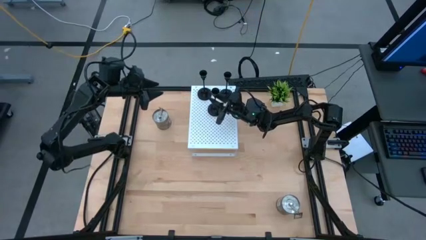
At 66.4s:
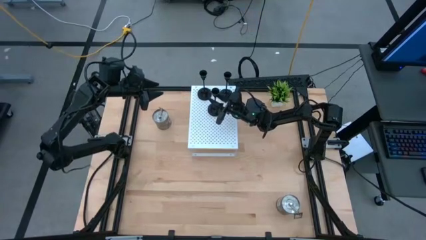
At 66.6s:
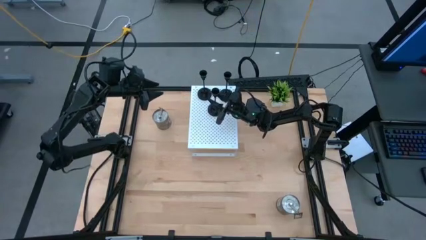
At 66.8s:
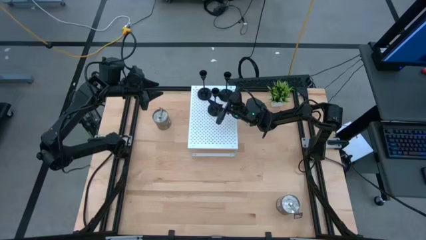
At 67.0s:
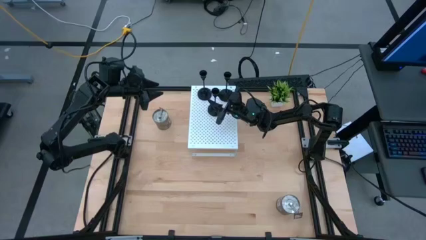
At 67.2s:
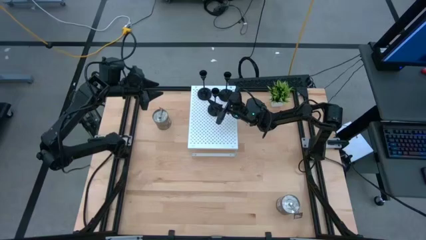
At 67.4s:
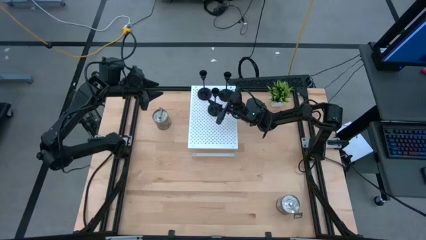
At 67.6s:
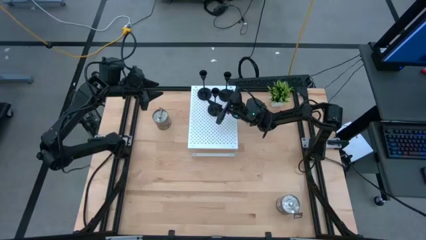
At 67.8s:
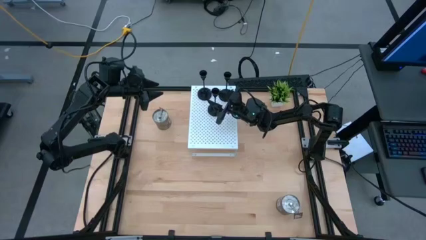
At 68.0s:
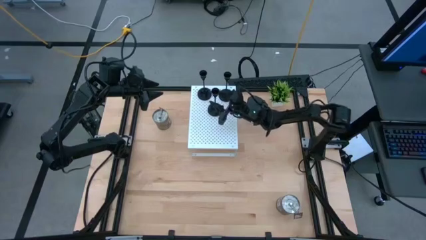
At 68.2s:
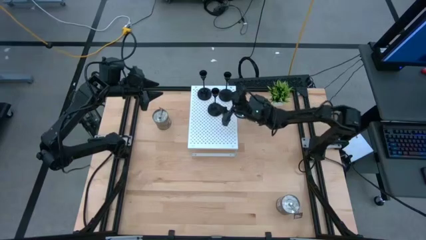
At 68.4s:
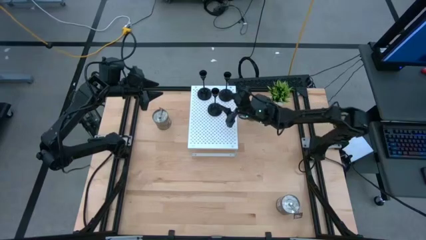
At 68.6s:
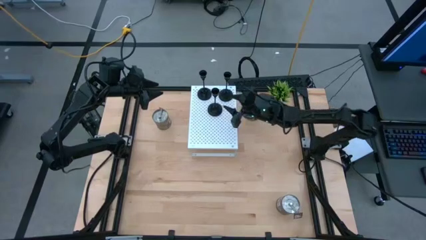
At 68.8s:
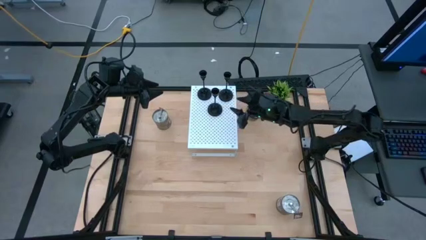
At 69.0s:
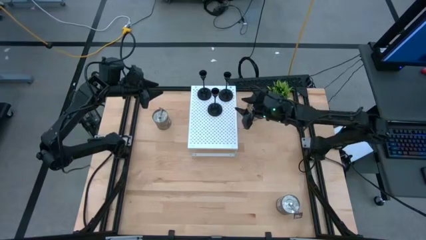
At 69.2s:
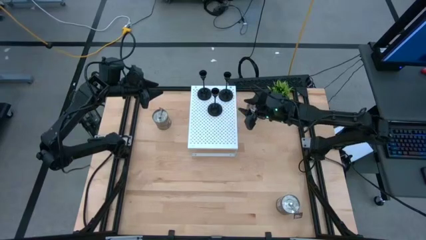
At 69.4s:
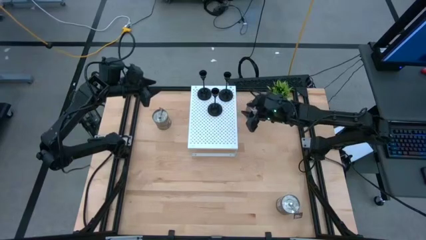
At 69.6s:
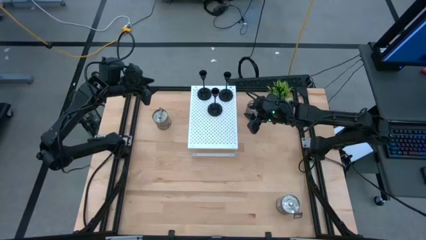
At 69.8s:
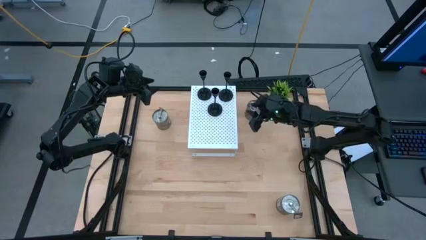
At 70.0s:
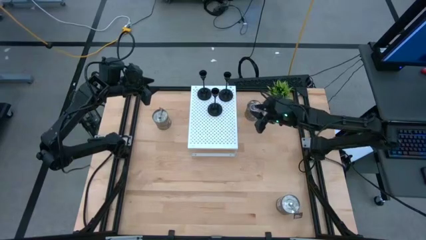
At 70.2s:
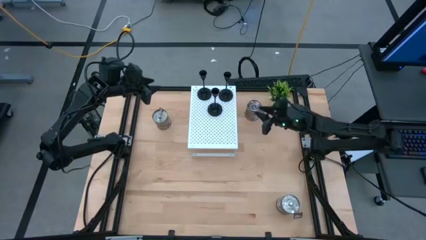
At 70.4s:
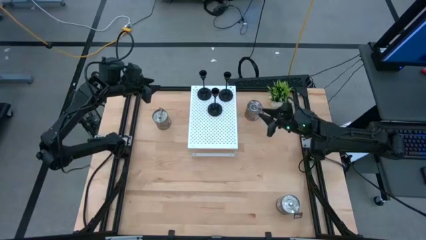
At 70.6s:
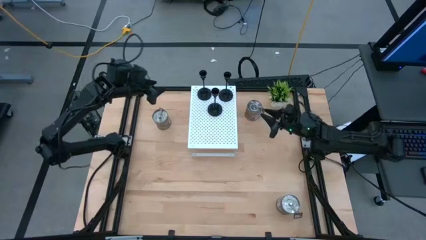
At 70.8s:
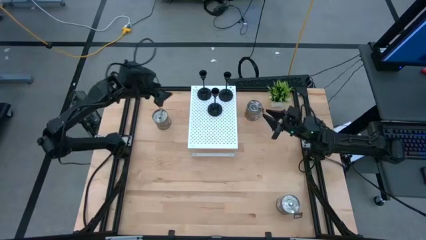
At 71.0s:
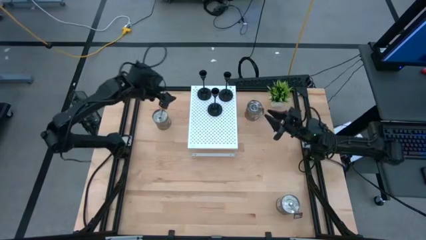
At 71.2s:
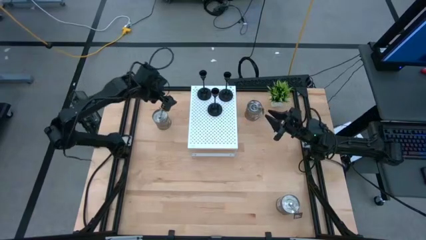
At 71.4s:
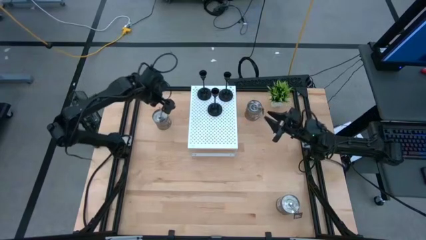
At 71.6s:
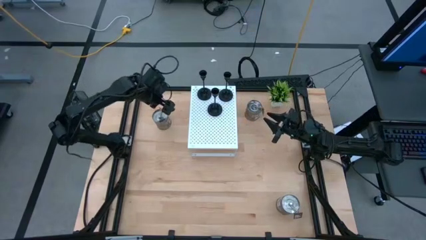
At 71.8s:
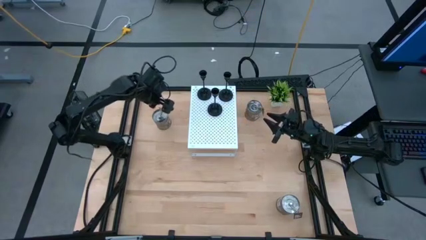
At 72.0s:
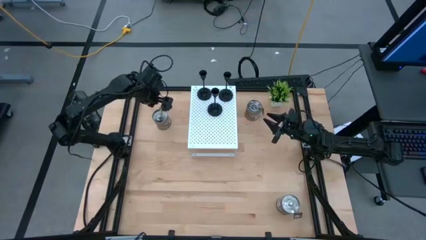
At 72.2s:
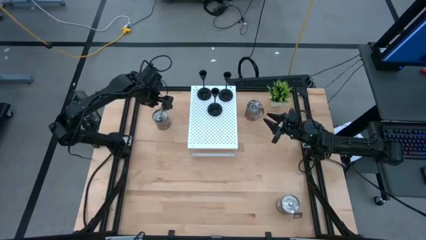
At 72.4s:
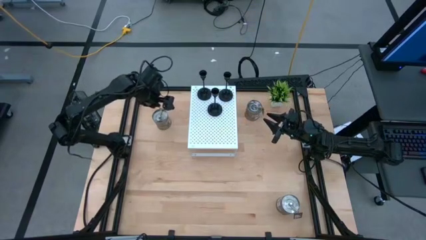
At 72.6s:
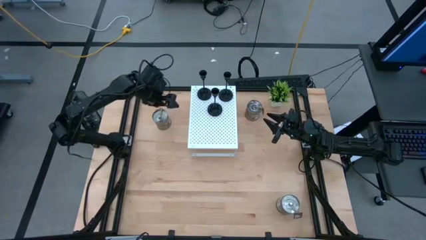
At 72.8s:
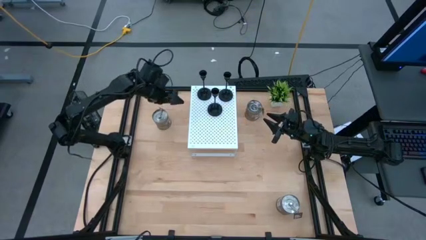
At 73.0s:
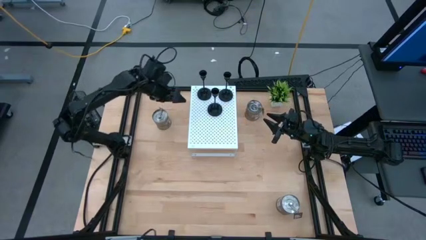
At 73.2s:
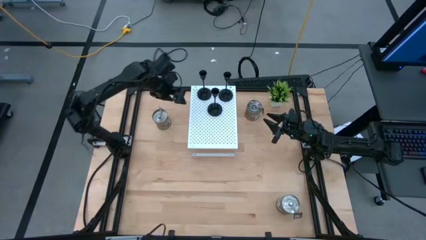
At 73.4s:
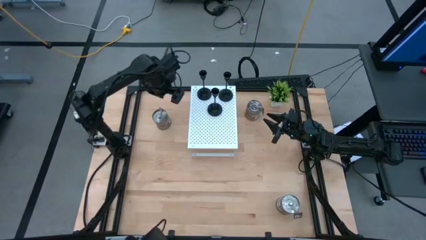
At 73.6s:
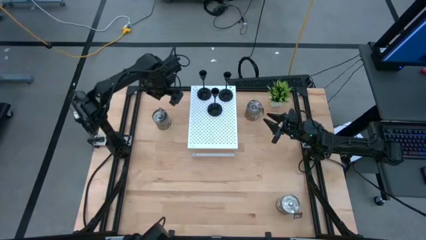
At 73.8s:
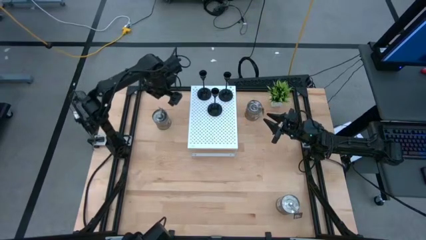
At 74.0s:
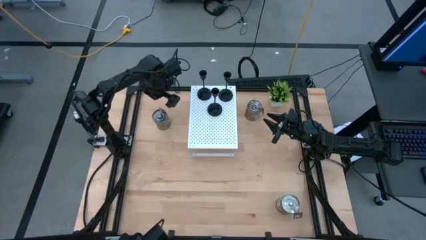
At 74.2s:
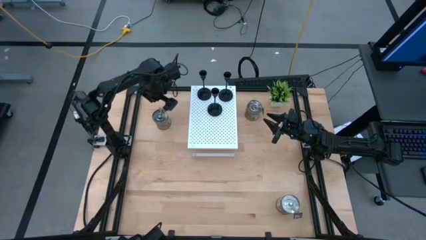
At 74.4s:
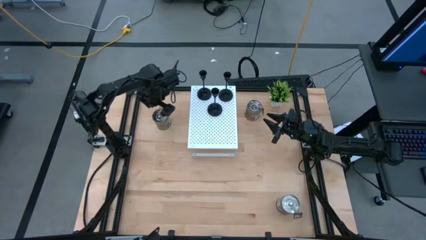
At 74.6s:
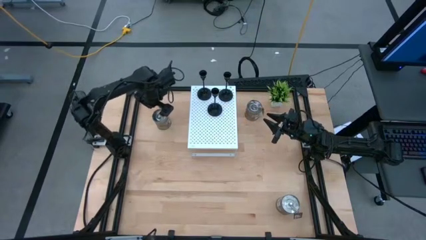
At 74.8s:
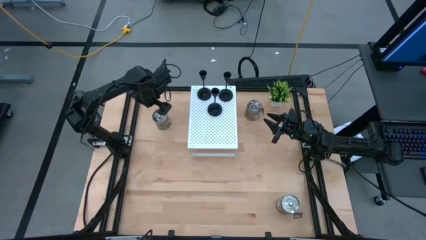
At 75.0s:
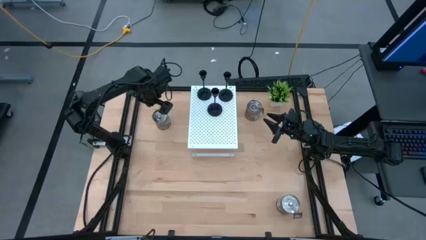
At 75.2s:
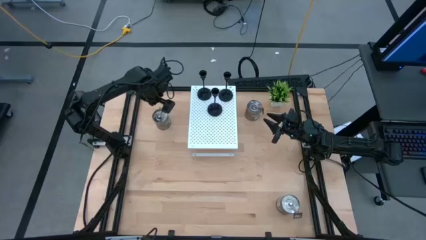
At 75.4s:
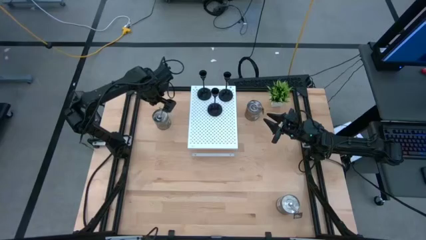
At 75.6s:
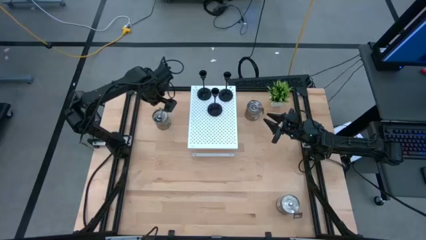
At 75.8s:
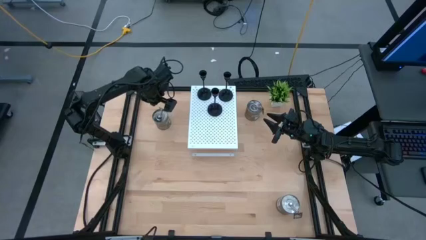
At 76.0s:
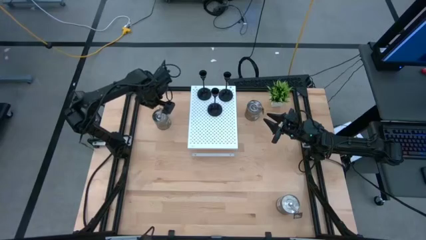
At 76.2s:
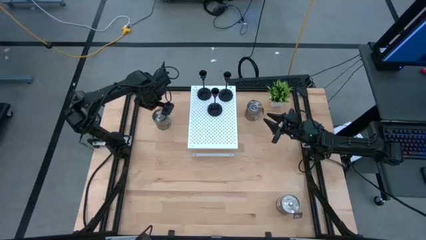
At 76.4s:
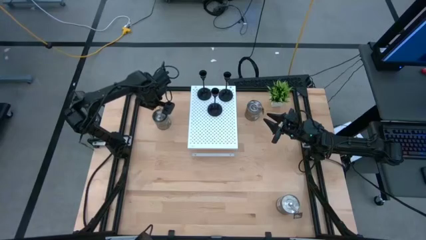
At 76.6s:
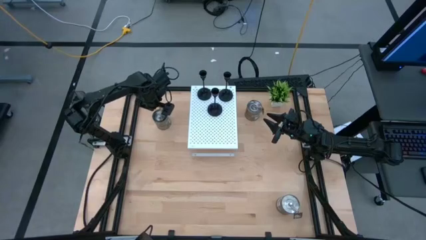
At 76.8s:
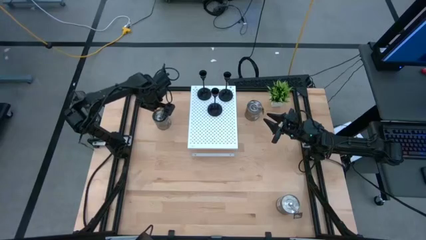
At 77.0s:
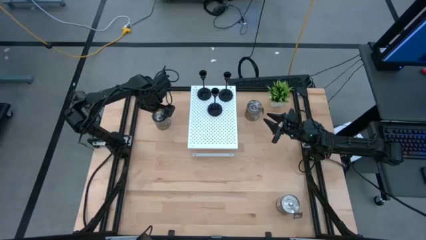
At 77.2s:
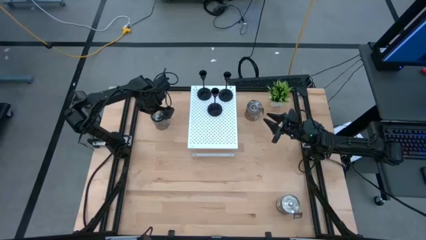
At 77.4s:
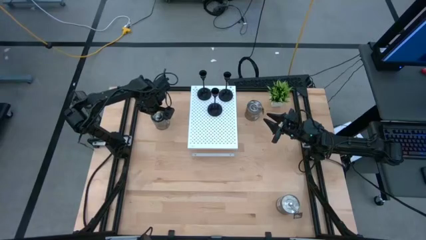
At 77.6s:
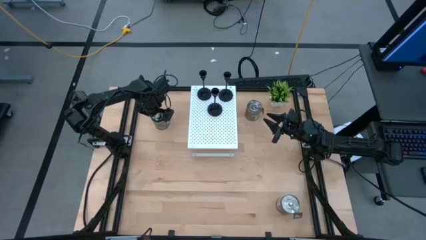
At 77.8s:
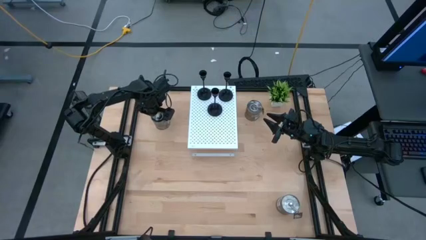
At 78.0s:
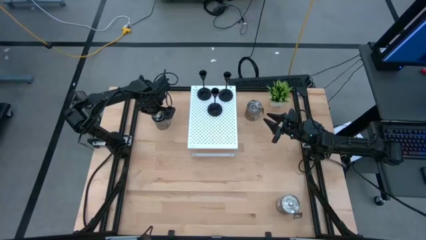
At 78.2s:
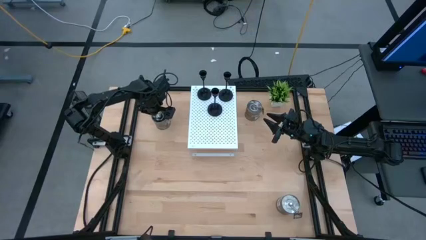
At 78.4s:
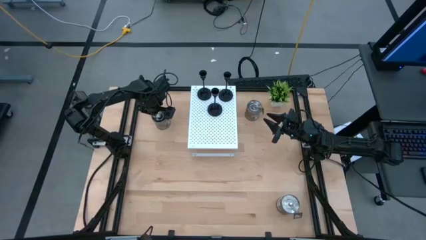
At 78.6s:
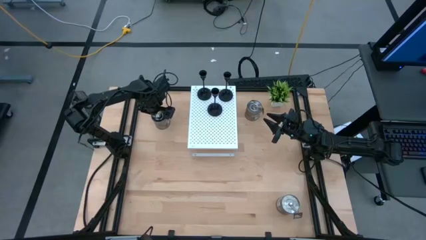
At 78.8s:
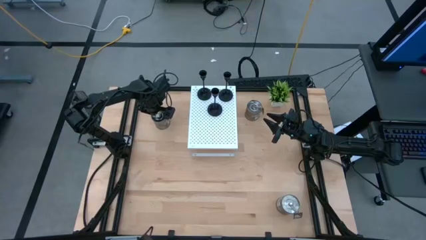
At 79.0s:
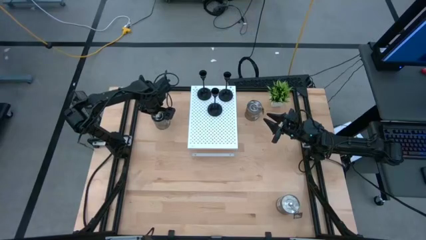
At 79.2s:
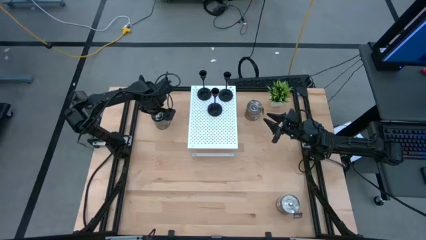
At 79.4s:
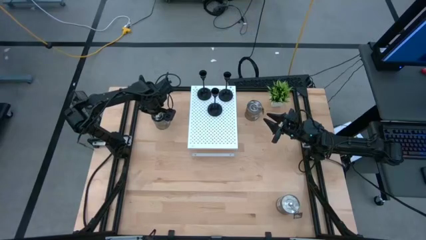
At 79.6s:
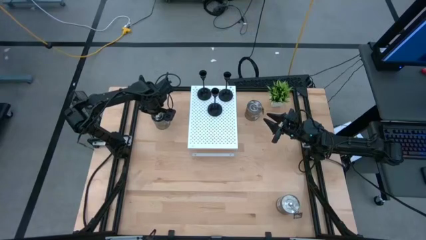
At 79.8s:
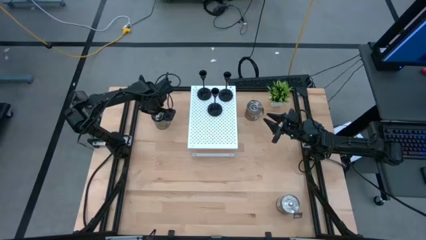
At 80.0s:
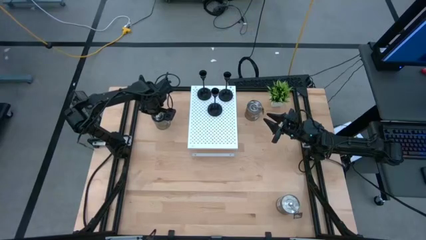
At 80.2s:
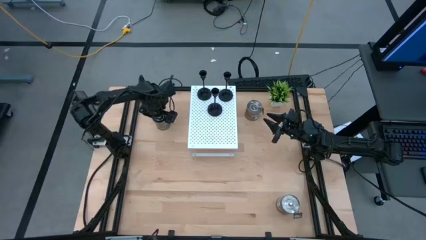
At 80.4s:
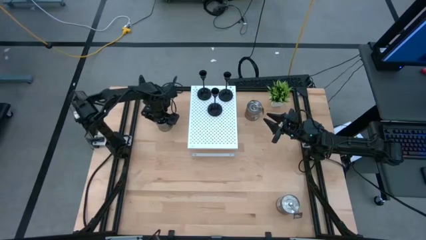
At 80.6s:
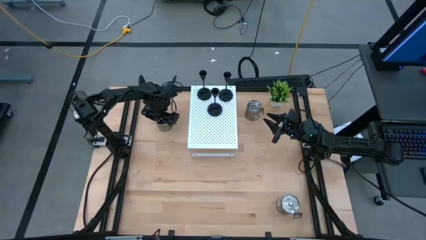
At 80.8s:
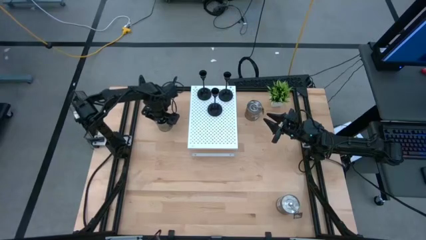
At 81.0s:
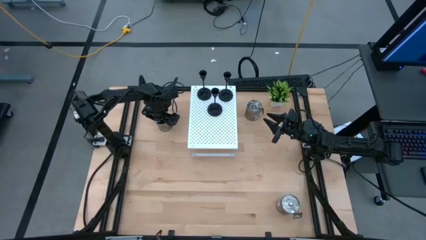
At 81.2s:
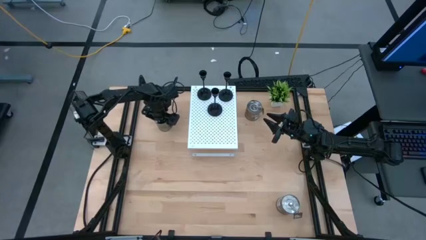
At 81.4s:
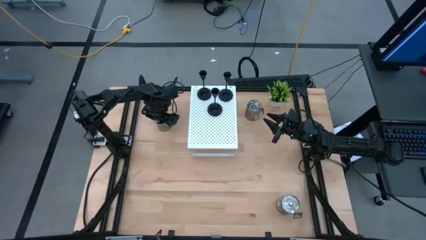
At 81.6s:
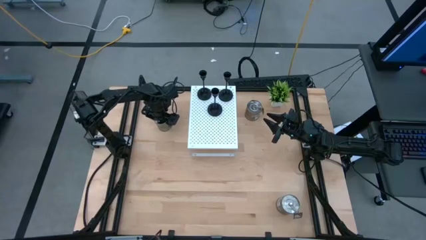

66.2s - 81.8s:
Task: Pick & Place candle stick holders
Put the top left brown scented candle on the shelf
